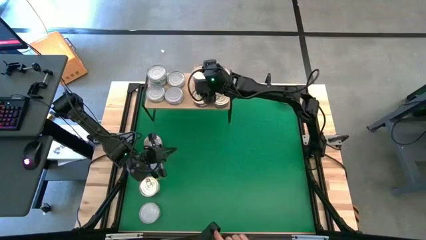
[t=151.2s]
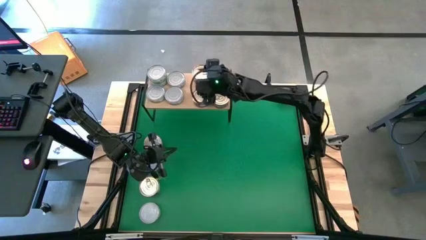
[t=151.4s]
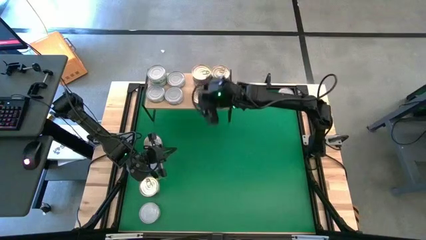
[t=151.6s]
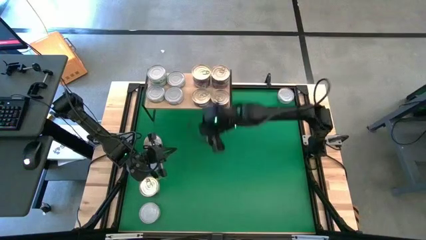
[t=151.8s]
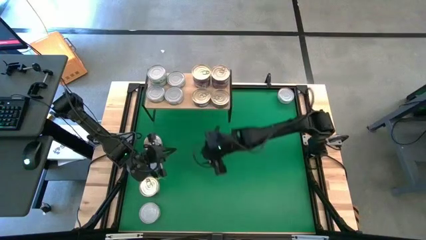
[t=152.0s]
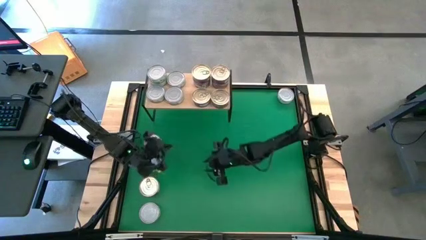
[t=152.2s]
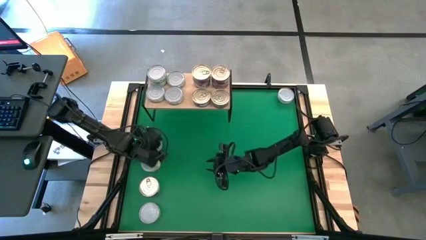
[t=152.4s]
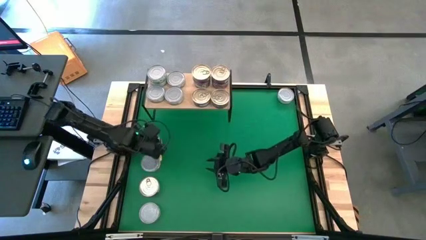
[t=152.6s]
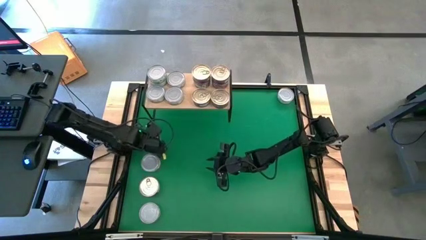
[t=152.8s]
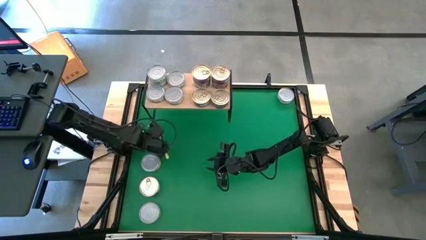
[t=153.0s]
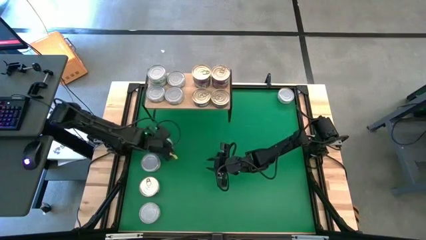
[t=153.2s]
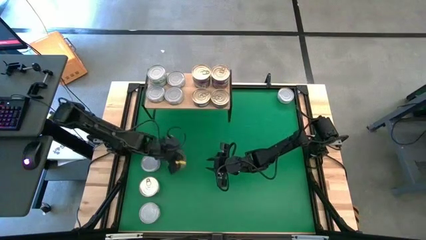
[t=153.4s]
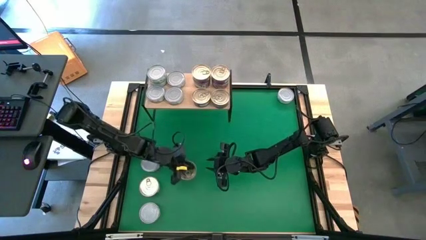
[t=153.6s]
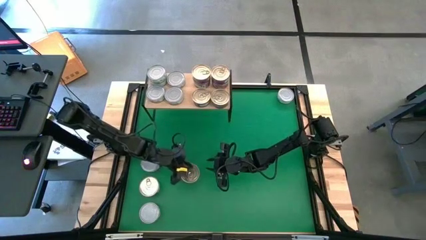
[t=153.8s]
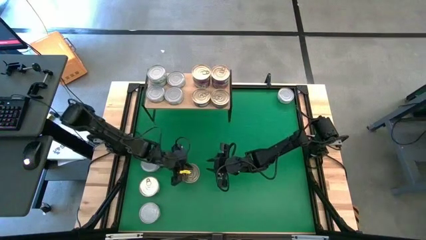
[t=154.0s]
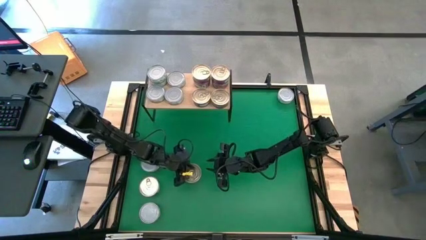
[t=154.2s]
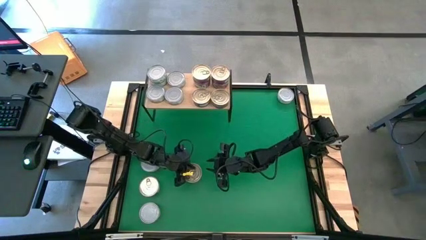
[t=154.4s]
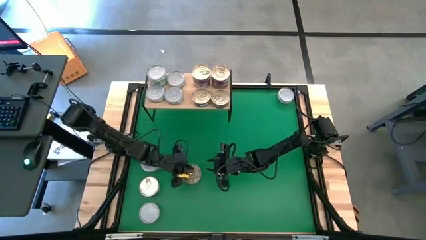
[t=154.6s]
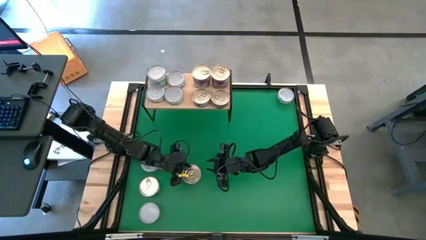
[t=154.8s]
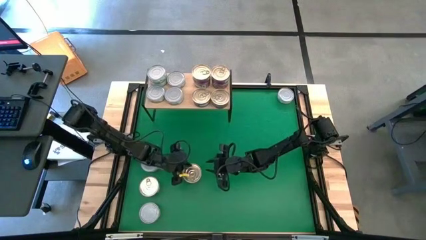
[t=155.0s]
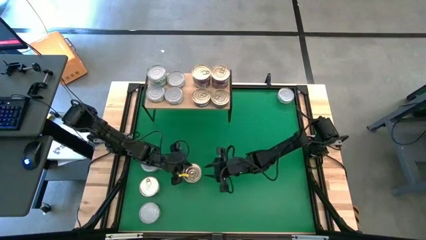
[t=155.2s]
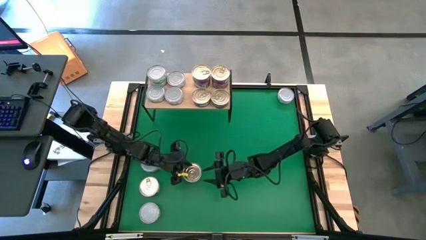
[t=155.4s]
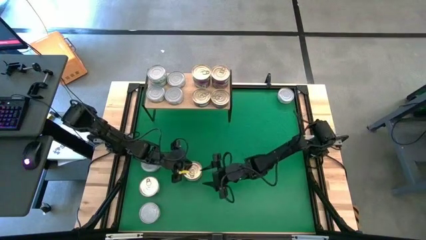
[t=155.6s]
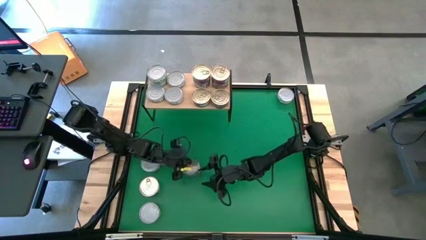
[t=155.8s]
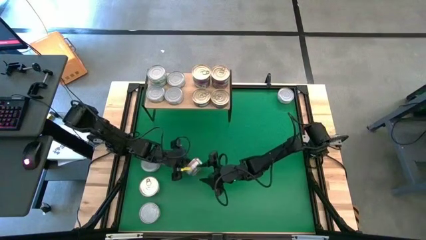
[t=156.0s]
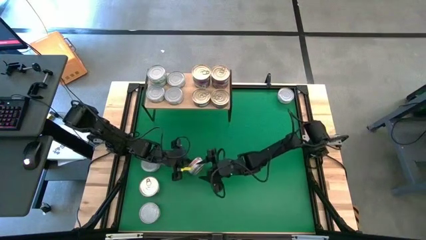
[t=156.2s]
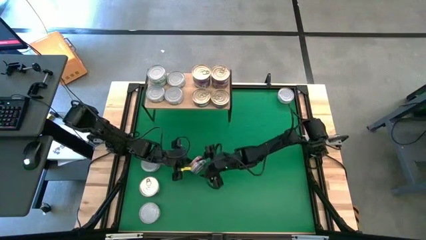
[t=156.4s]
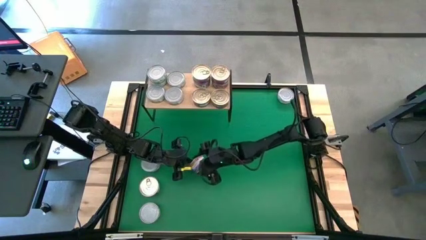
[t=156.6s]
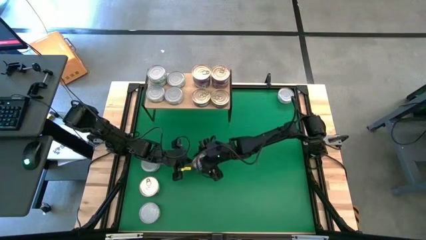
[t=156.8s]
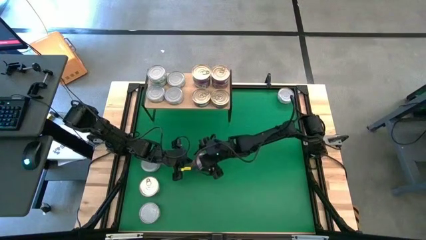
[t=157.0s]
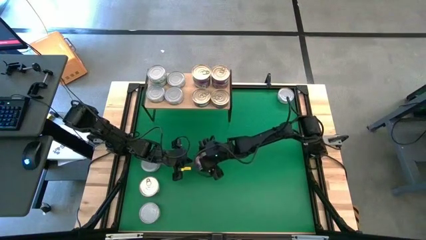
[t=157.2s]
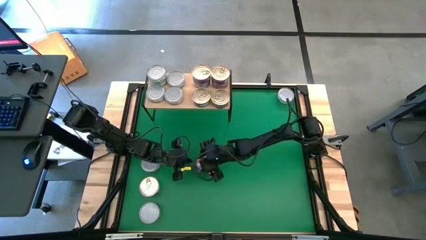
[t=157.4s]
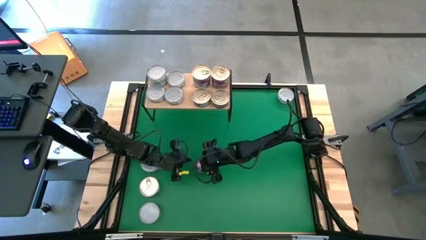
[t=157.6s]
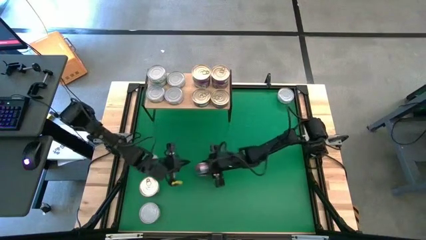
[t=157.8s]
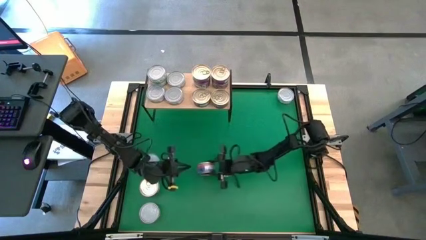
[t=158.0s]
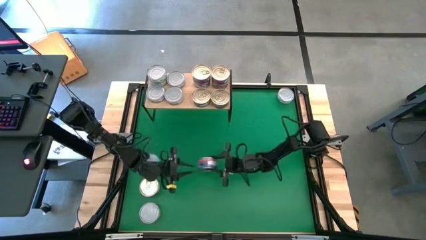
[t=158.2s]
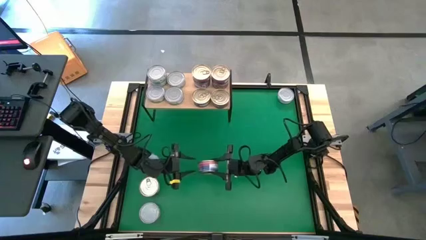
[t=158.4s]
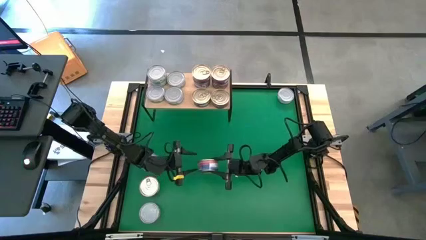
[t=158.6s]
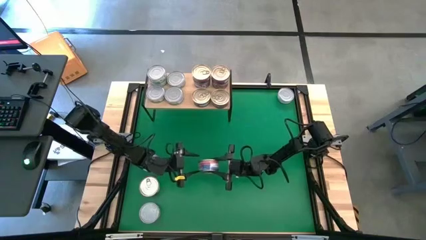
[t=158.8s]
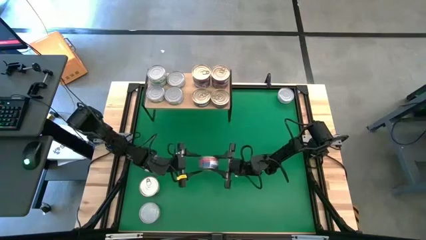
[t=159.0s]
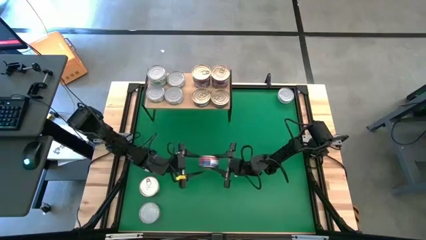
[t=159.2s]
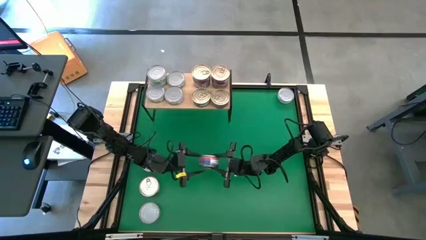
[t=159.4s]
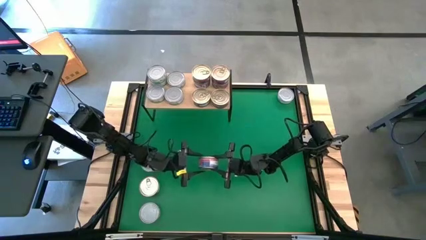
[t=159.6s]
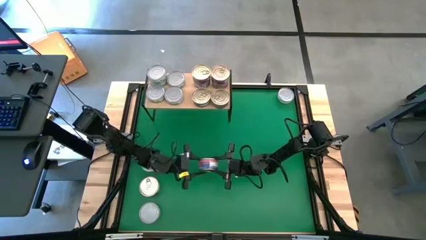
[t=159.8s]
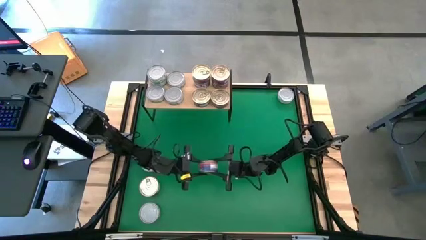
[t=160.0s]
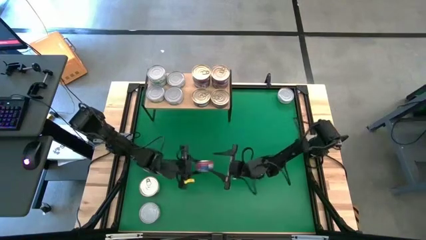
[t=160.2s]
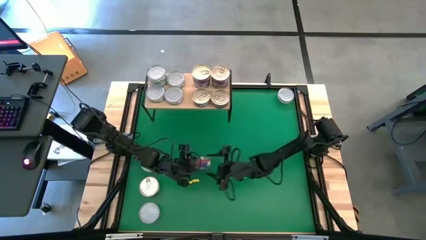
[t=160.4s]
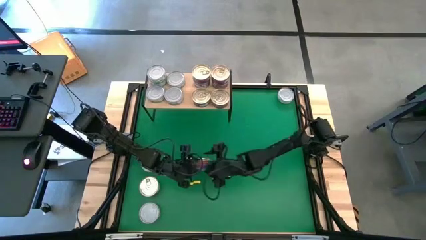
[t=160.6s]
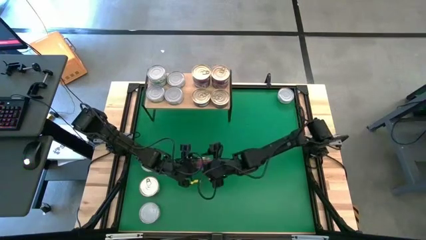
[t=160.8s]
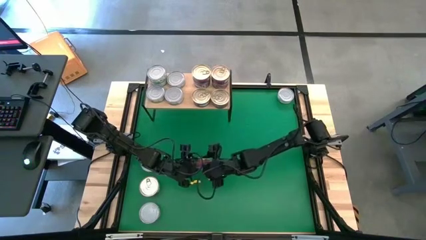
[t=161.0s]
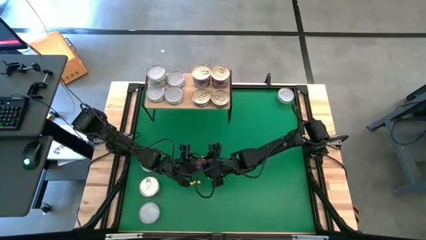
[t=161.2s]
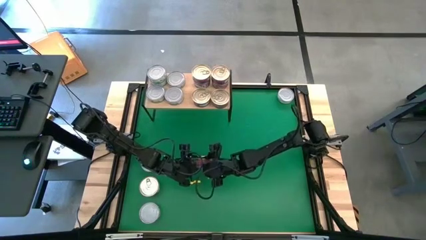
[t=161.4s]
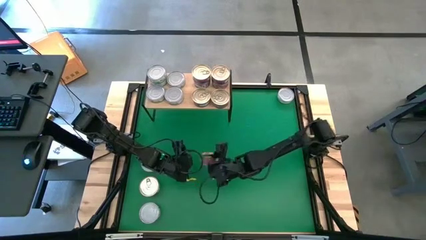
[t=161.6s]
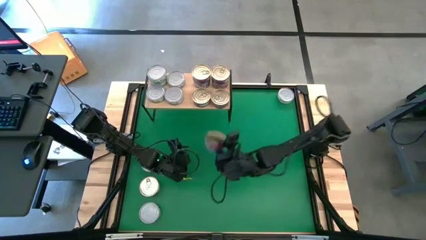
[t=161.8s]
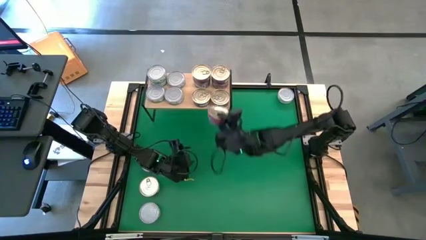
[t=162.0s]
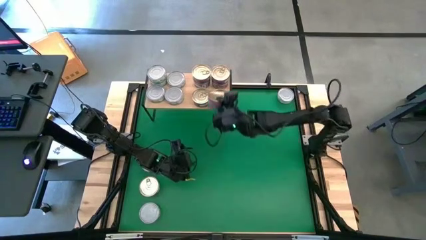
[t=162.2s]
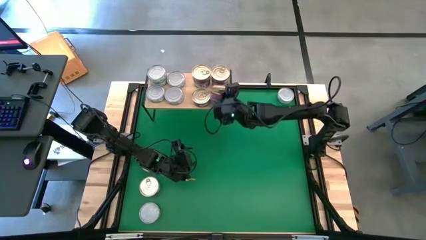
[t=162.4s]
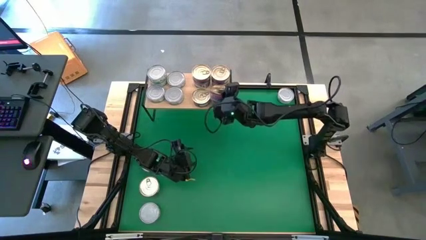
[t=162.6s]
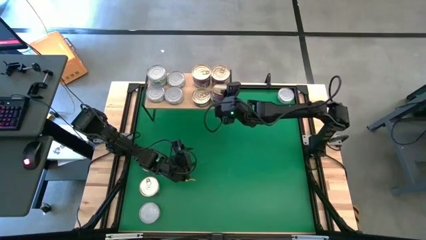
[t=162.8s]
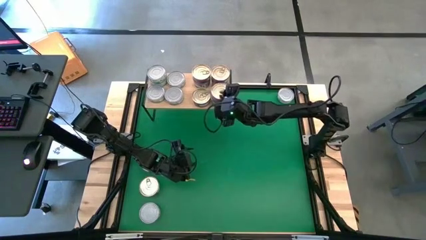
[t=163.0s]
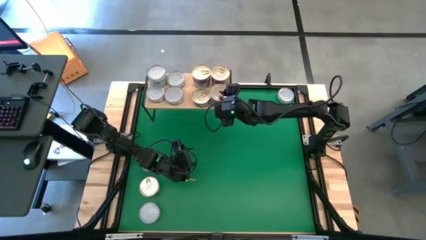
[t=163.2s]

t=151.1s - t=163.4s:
Task: Stack canned seafood by type on shelf
Stack the blue-pink tuna can on the other blue-pink tuna can on the shelf
